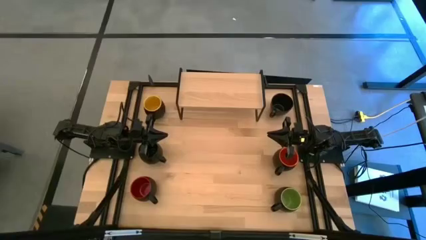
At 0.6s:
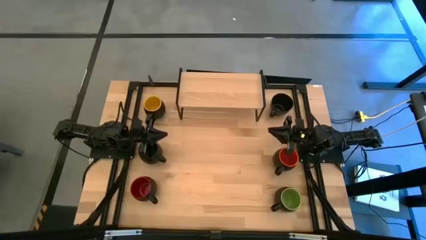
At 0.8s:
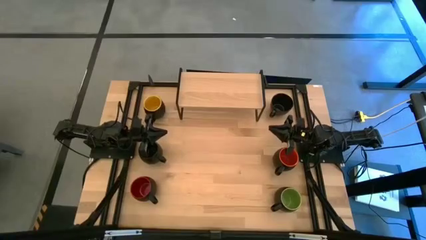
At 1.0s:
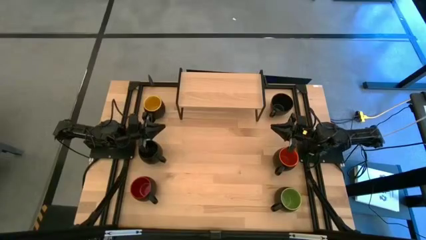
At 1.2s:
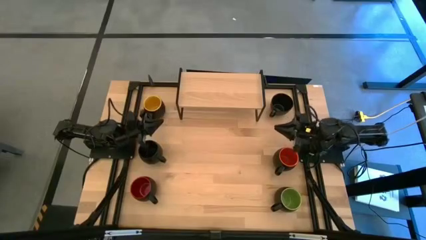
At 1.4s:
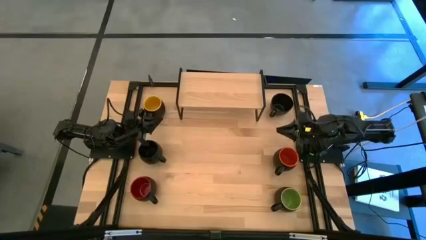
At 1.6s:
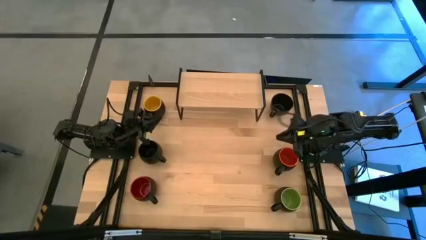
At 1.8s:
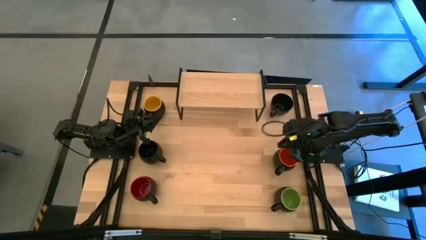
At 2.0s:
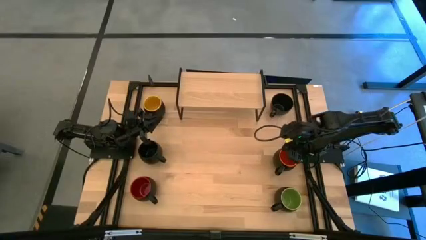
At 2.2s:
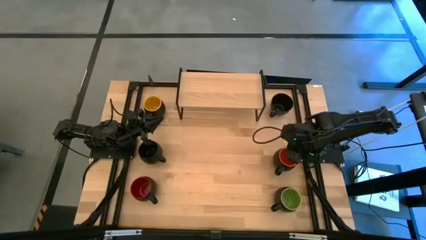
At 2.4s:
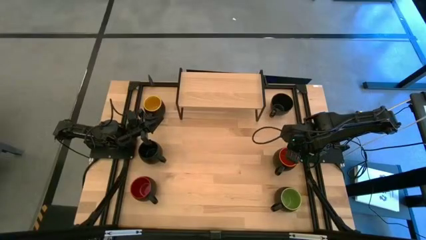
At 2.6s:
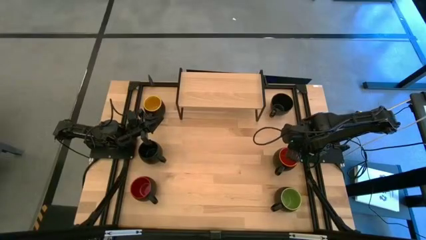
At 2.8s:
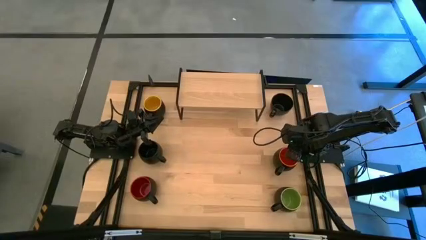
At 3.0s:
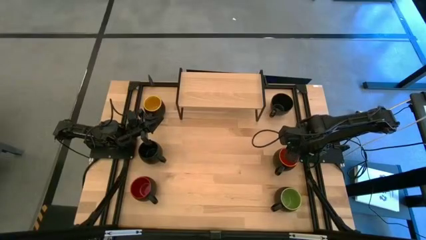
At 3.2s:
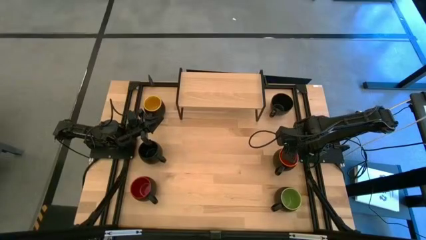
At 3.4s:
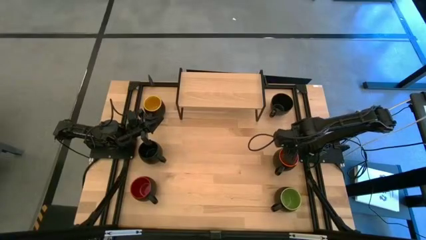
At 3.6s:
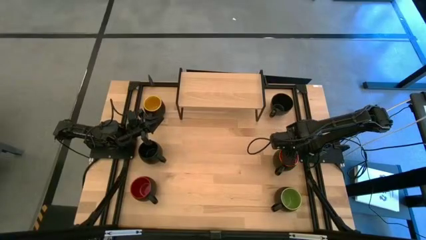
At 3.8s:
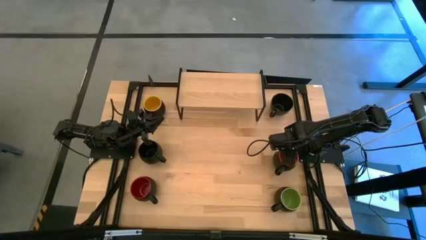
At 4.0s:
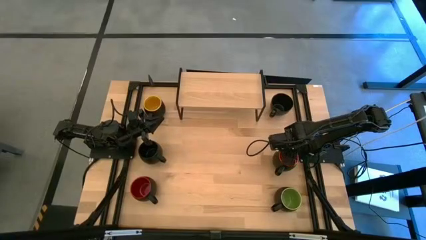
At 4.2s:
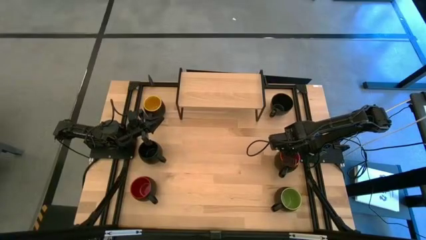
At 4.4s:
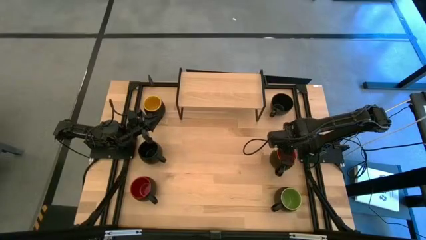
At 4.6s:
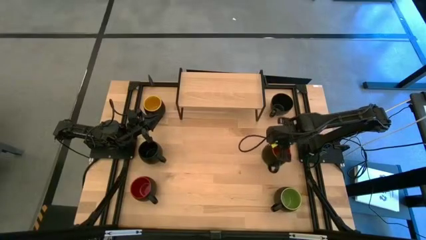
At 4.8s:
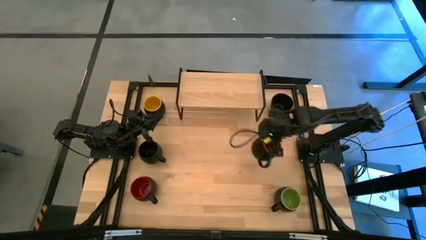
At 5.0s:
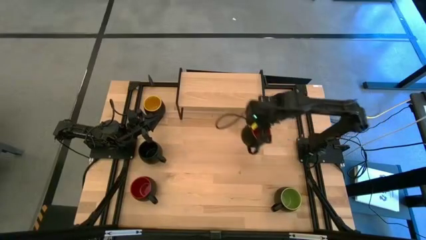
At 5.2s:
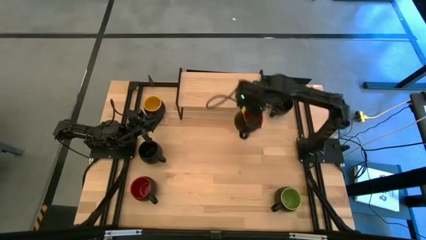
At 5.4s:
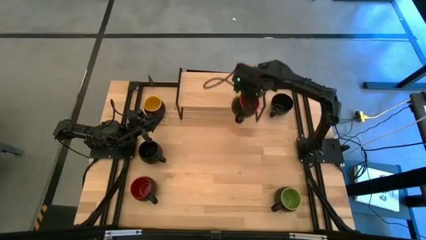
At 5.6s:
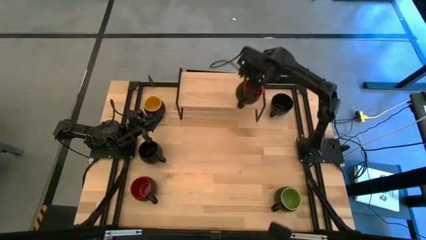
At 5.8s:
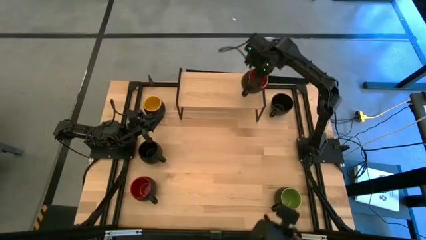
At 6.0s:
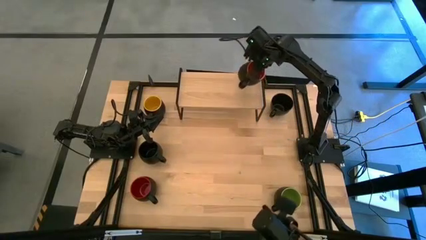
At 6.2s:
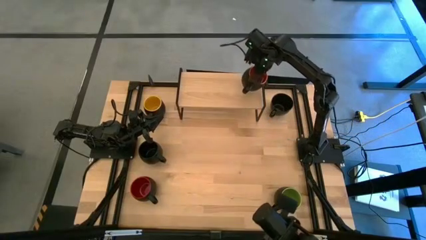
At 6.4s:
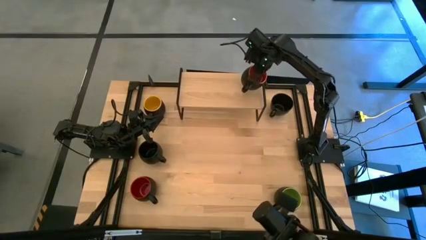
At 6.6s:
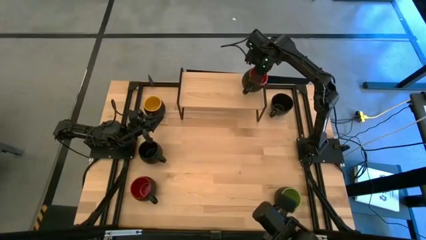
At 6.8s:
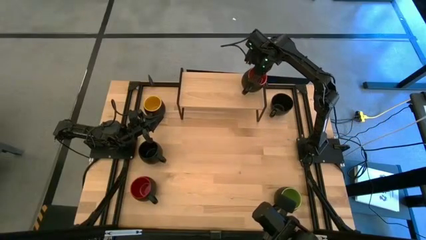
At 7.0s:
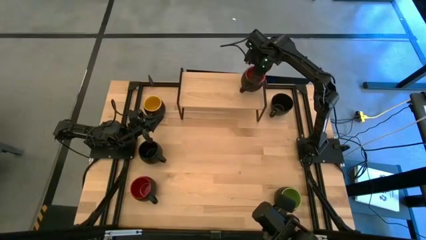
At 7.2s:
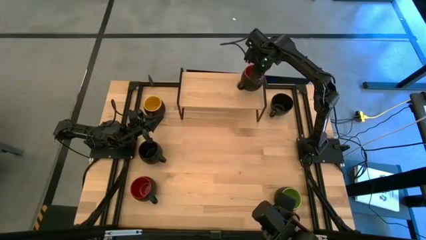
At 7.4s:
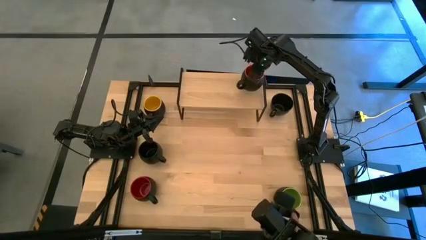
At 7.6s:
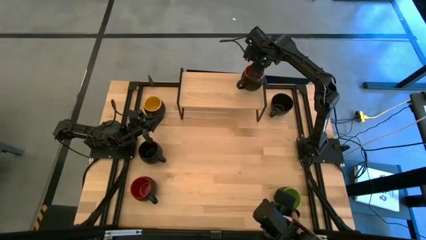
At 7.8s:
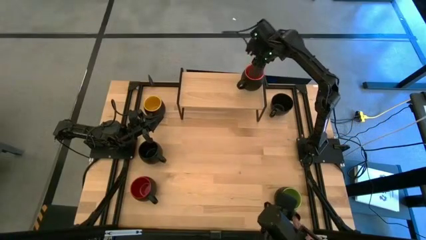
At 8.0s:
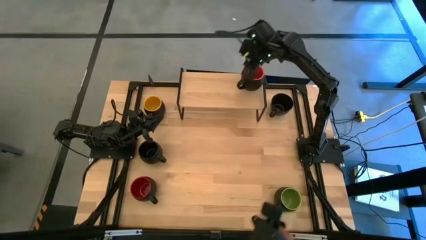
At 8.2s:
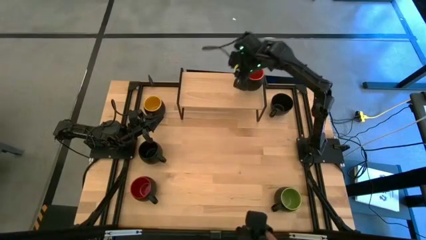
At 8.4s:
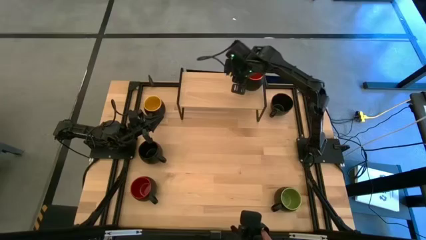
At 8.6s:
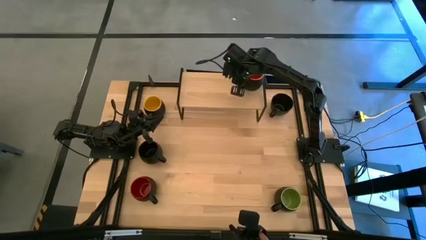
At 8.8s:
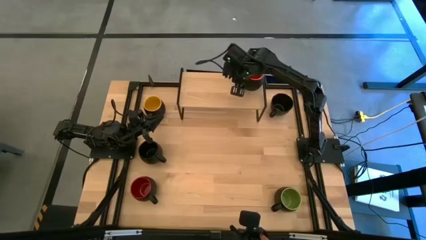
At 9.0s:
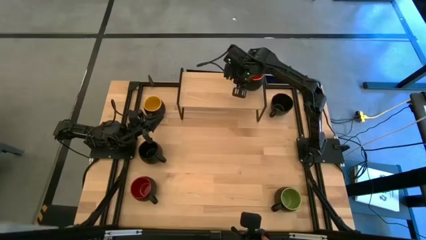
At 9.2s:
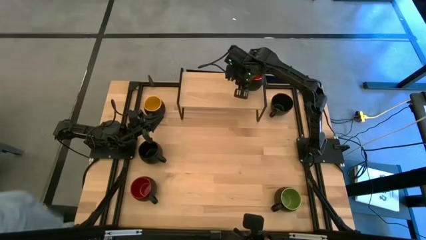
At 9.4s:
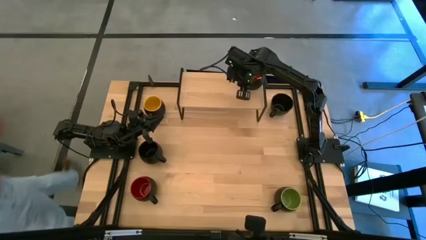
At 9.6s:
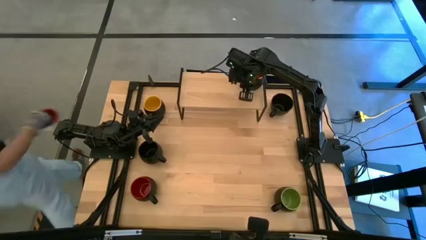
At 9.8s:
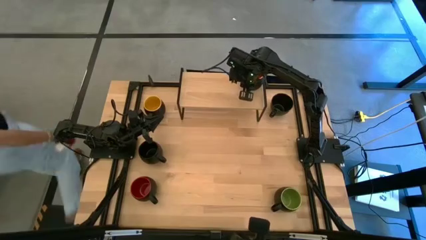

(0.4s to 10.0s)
Task: Place coffee mugs
Put the orange mug on the shelf

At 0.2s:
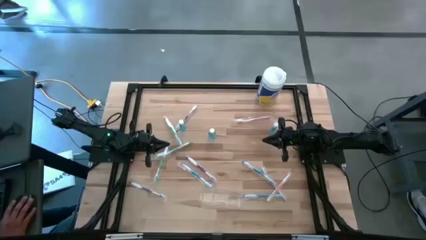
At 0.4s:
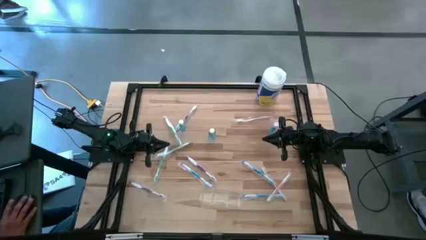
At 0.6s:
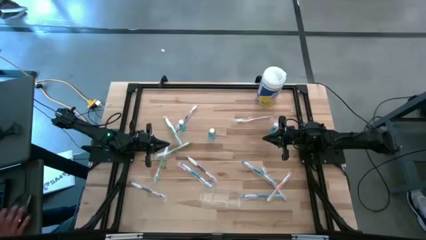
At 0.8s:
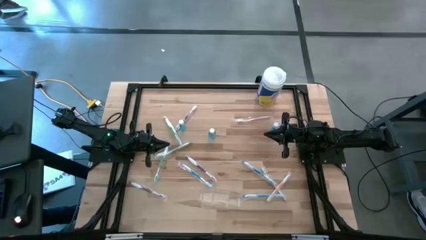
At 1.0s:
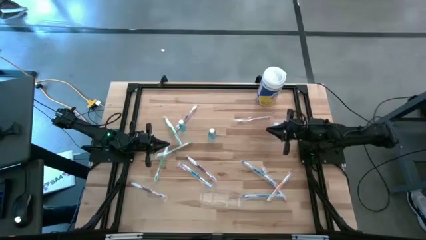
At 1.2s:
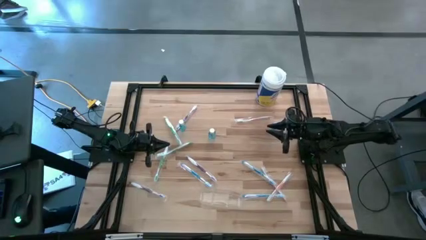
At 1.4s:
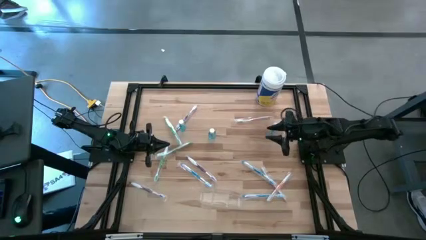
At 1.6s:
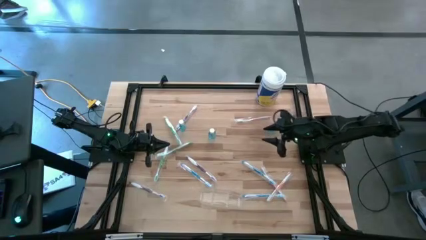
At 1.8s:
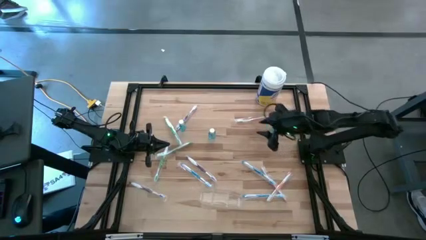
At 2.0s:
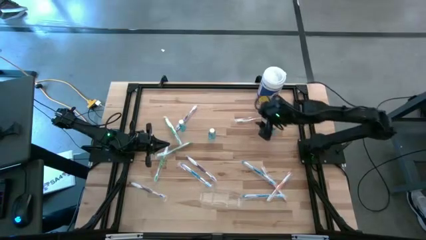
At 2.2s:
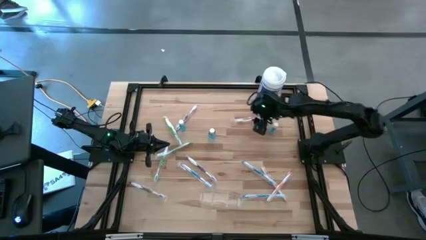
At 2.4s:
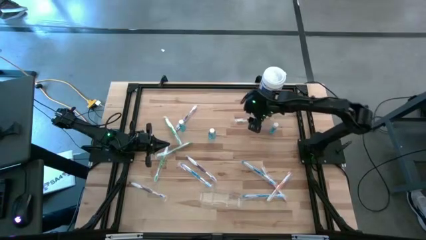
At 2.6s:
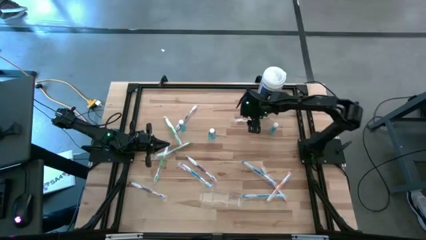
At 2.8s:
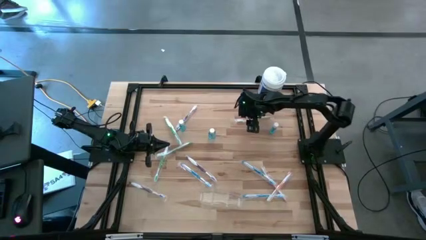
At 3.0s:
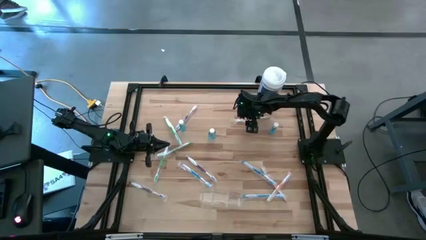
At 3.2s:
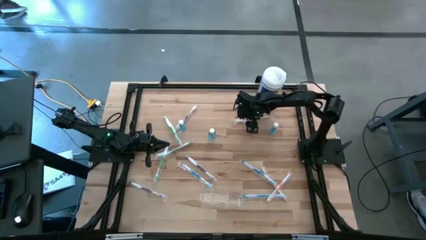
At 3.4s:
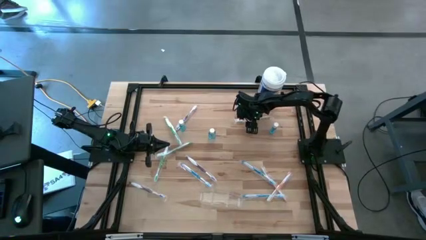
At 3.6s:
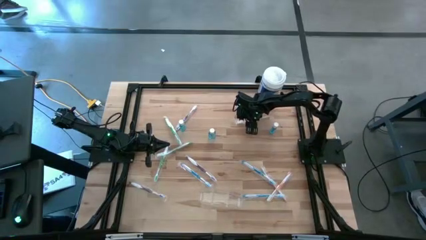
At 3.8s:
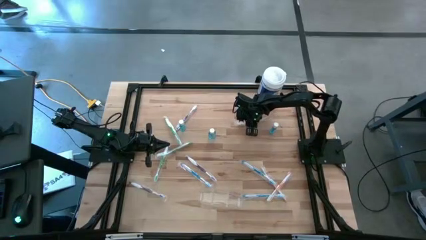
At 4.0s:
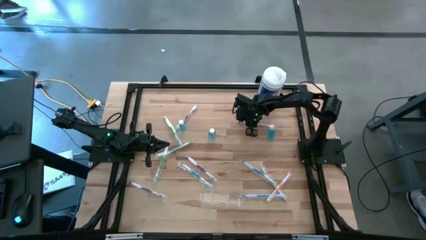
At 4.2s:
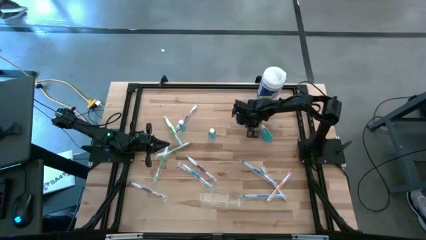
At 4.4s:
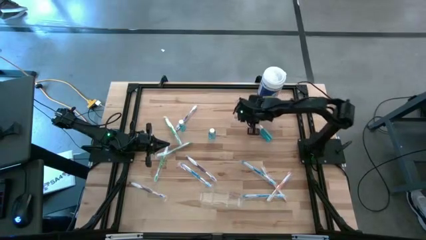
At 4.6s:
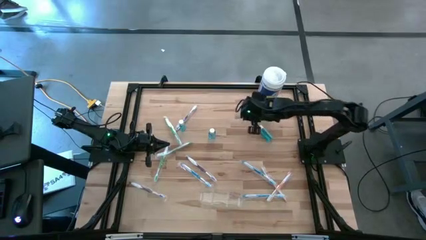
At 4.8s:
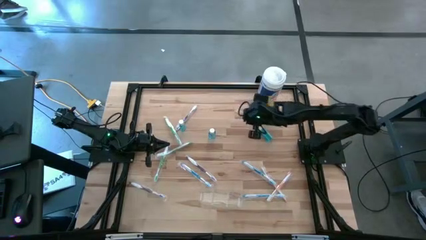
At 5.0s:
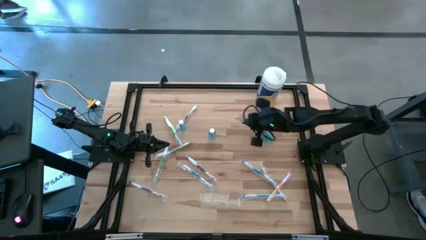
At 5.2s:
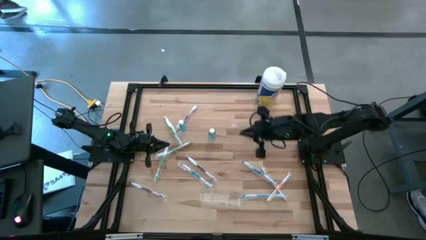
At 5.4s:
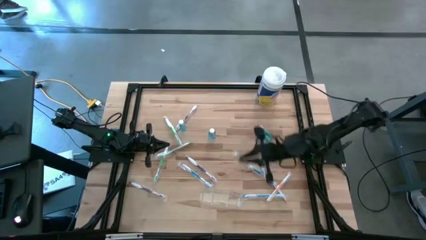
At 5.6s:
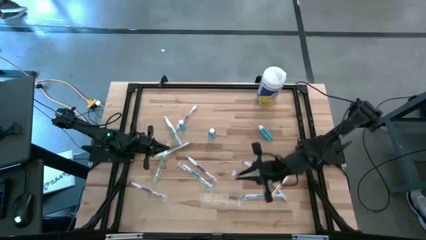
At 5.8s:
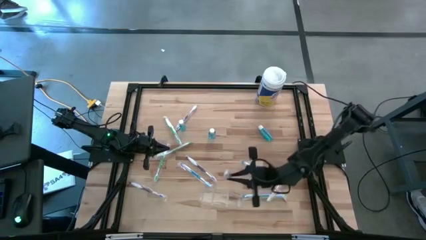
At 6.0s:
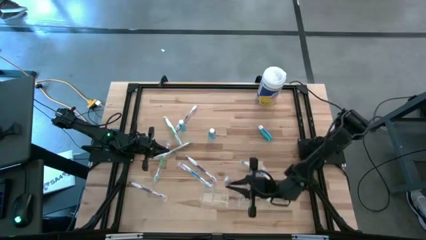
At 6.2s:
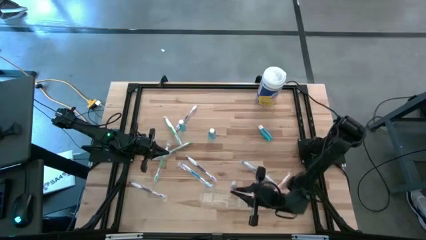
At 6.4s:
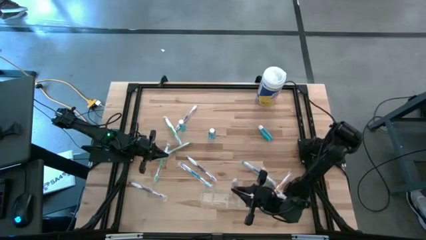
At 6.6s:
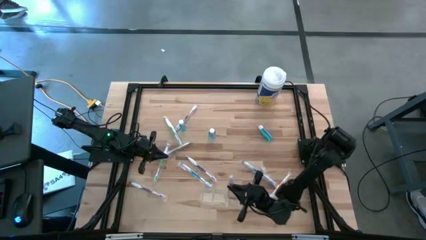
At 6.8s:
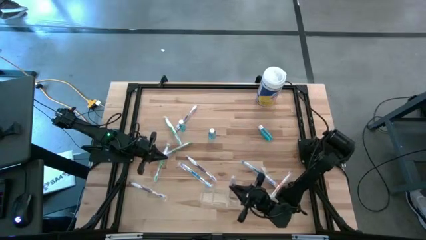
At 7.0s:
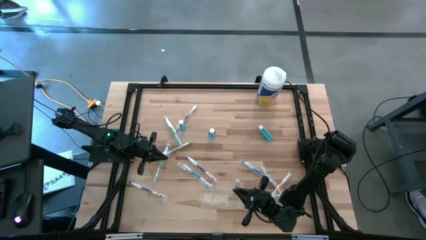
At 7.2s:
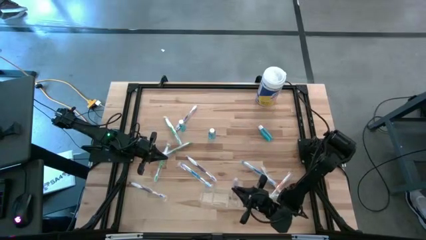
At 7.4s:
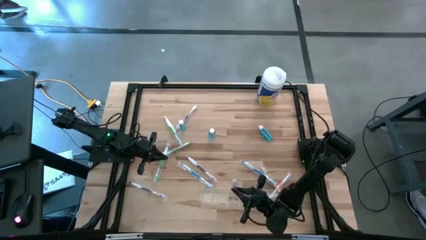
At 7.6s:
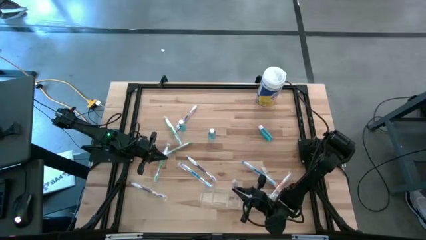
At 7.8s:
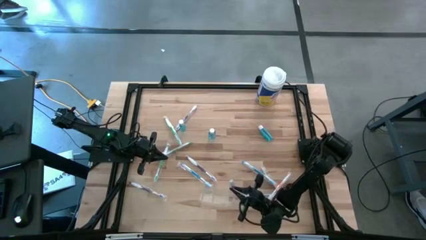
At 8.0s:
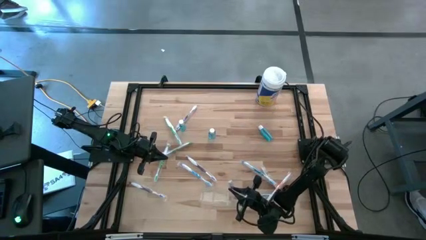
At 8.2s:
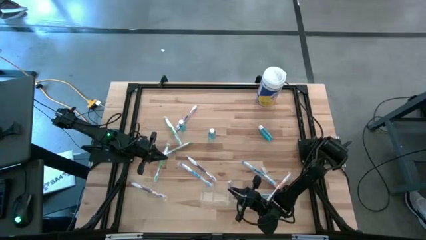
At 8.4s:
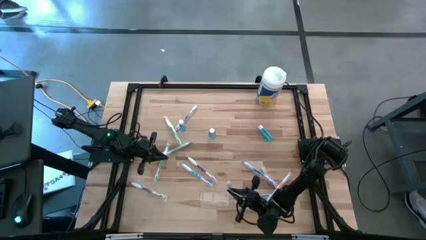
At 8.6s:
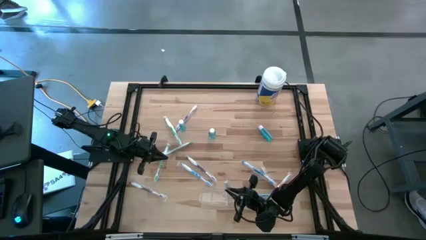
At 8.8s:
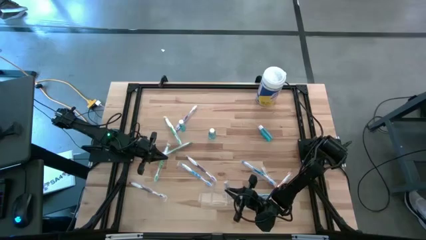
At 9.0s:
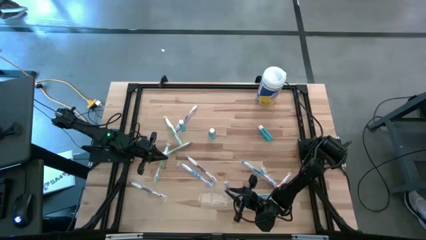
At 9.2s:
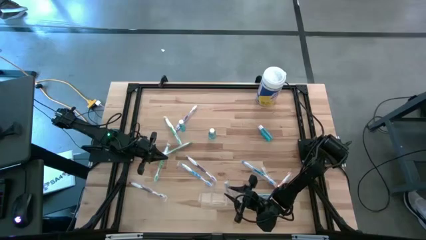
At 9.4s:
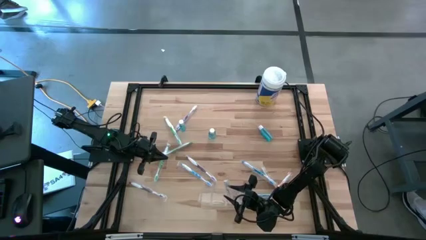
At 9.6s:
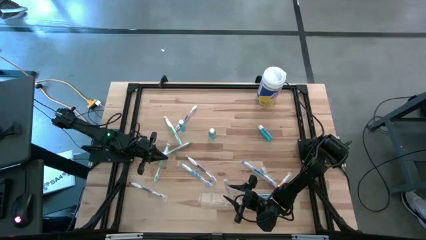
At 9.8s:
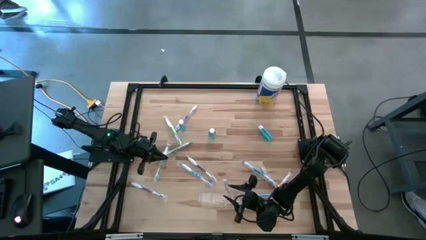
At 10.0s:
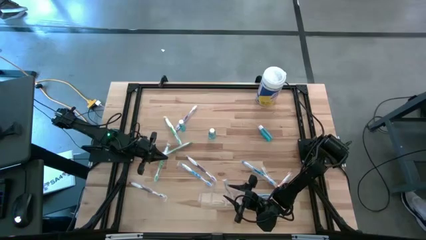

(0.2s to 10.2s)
Task: Pick & Place toothbrushing station
Put the orange toothbrush into the transparent organizer
